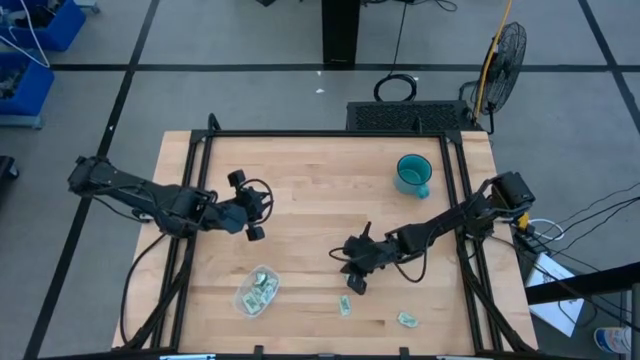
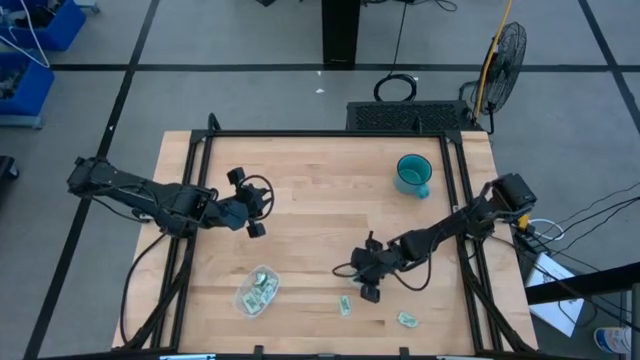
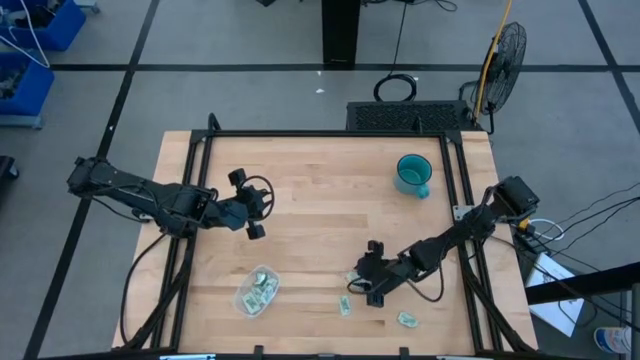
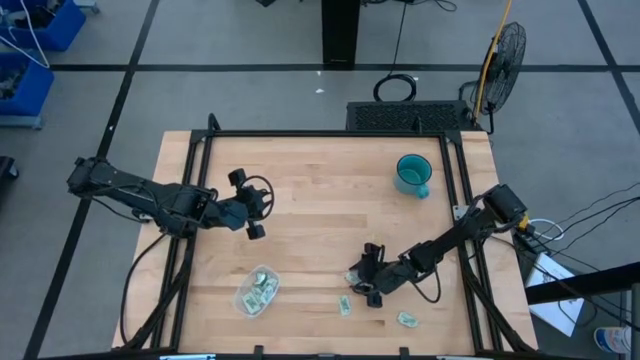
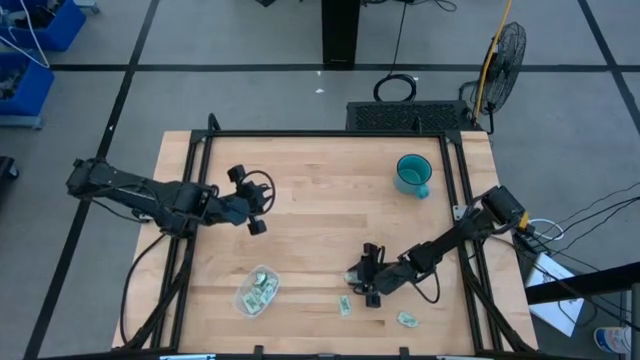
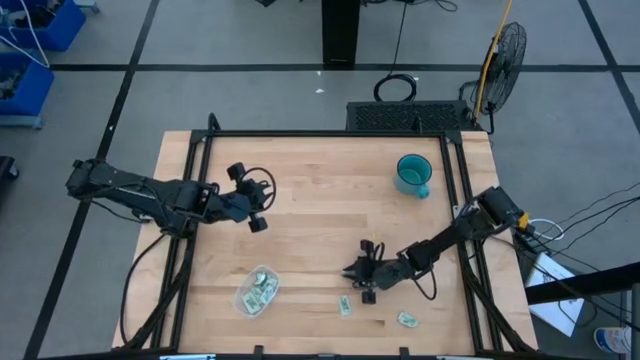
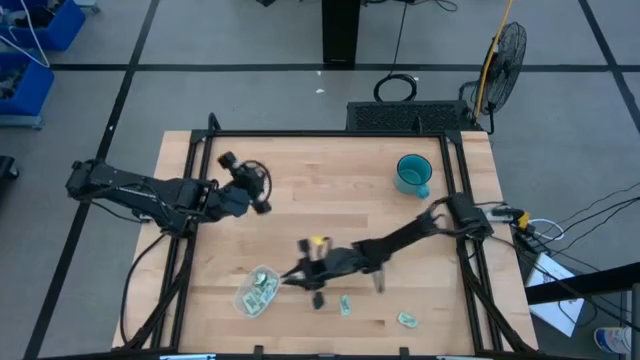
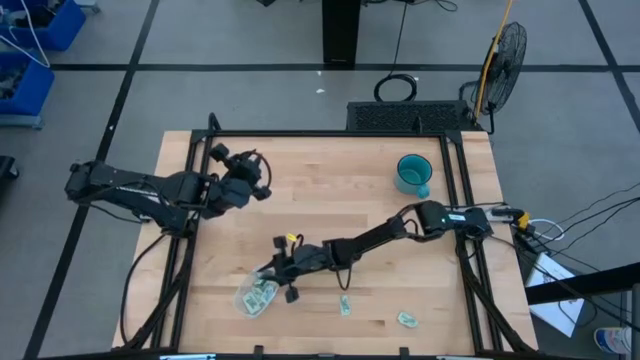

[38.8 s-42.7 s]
Task: Pick and place Stevia / Truvia into bins
Put the white stevia packet into the transparent bin

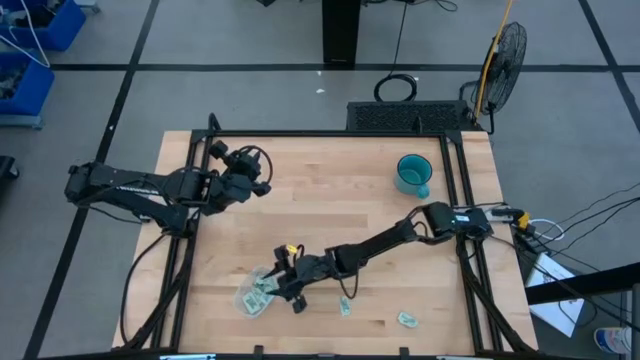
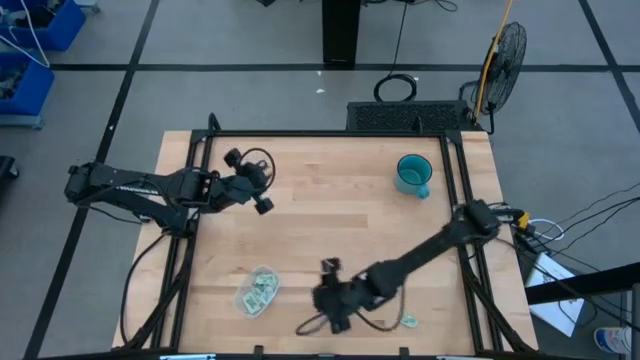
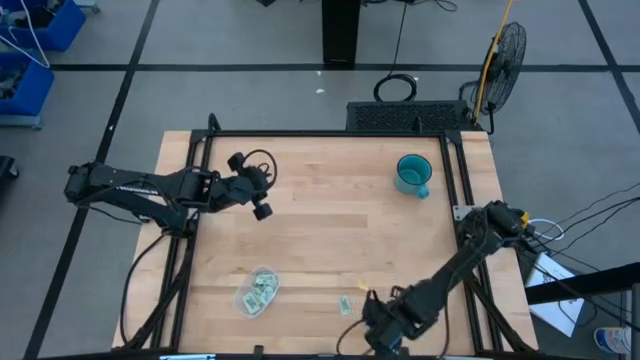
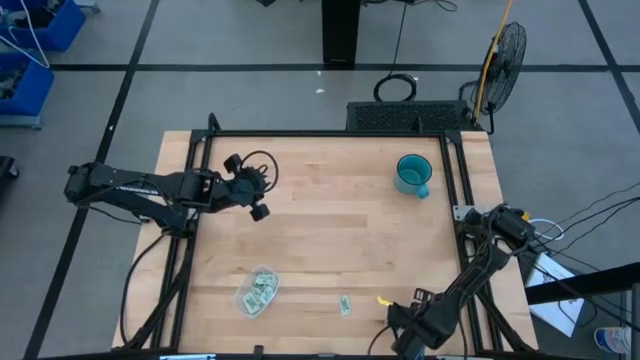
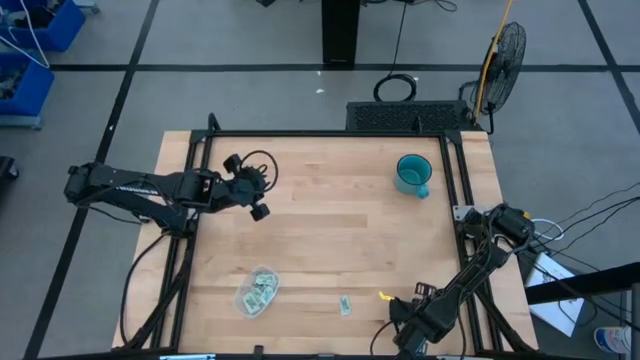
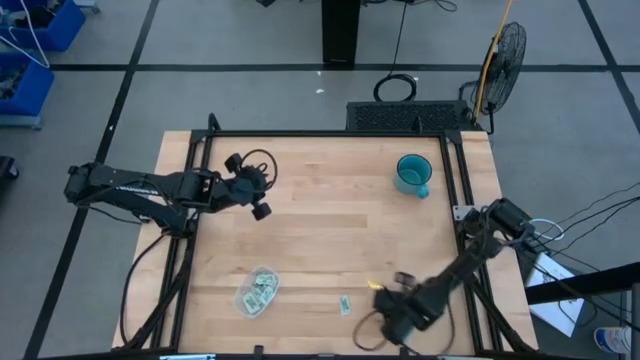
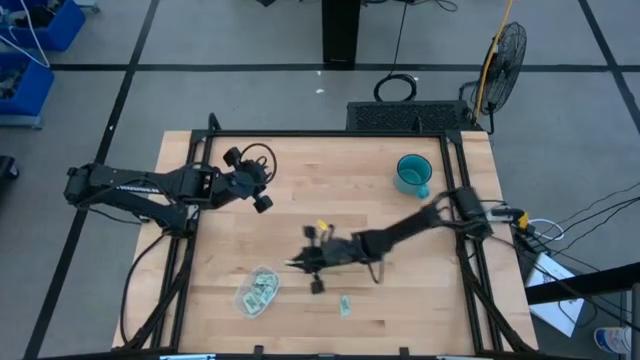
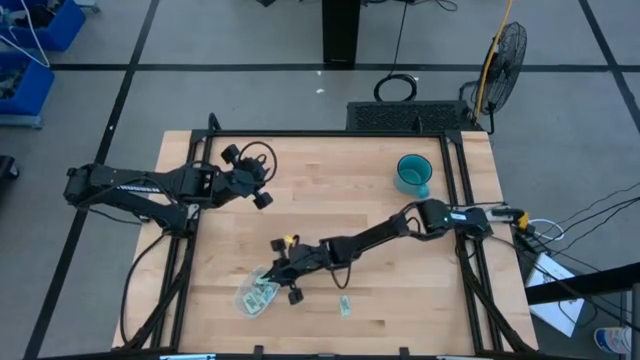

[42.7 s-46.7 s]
Put the white stevia packet into the transparent bin

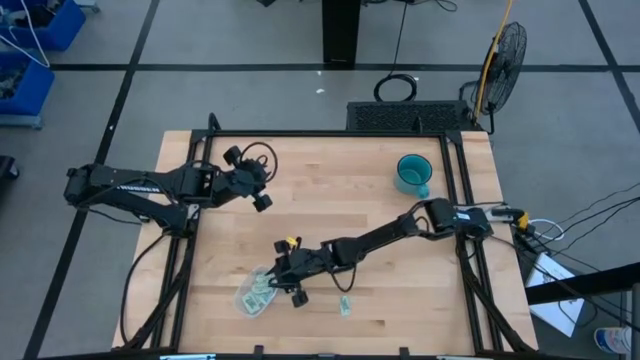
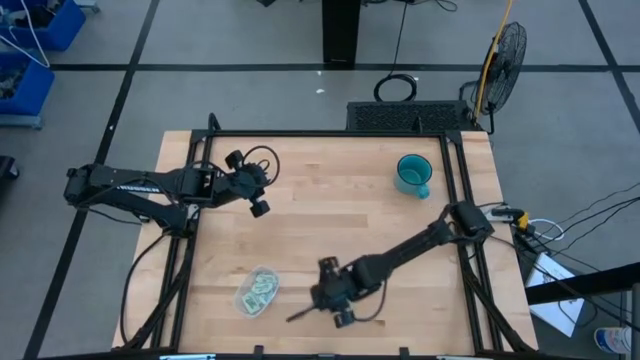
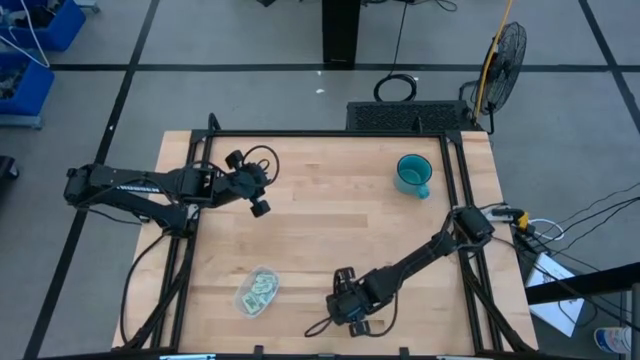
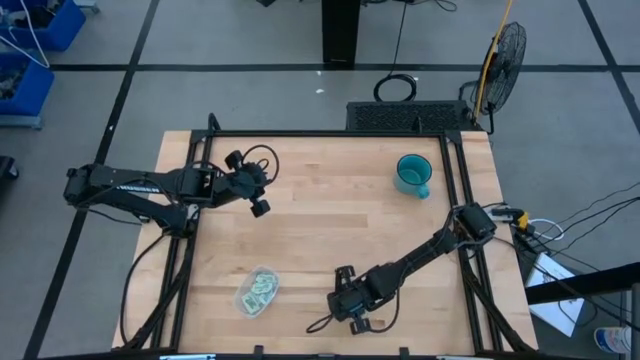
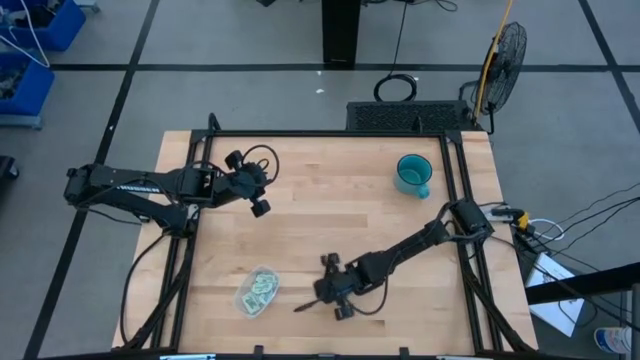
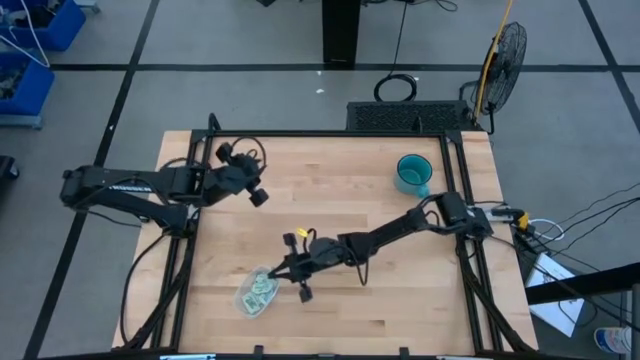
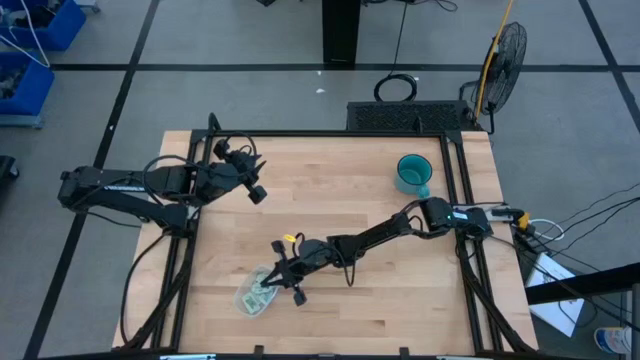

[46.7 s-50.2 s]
Put the white stevia packet into the transparent bin

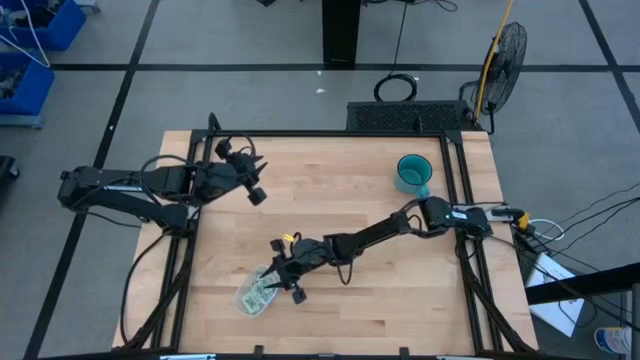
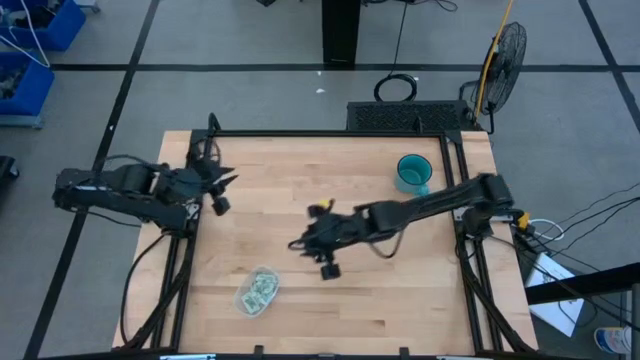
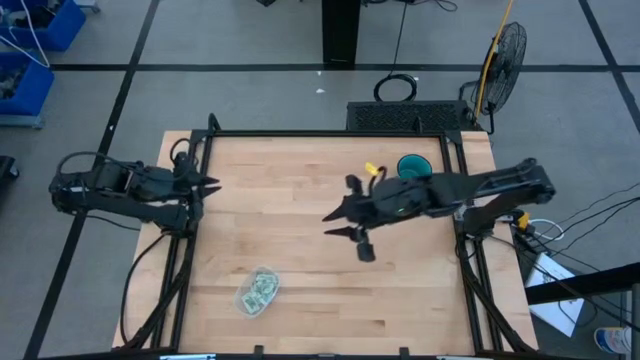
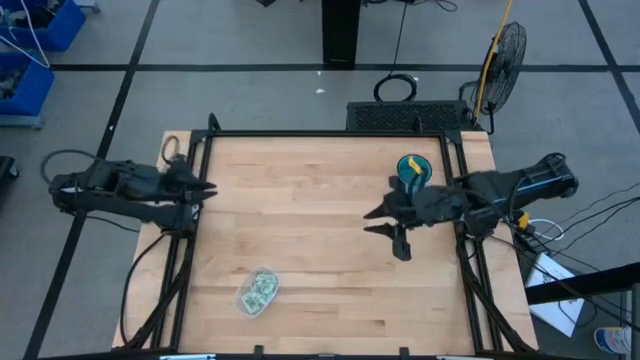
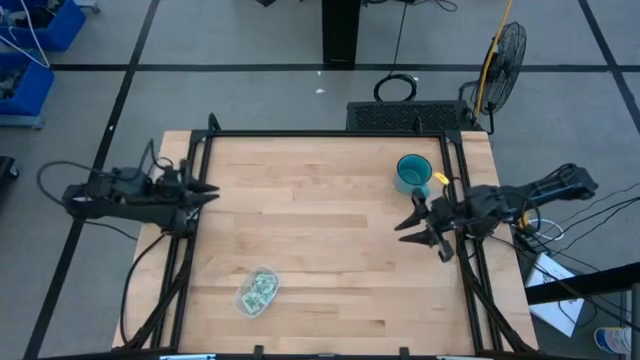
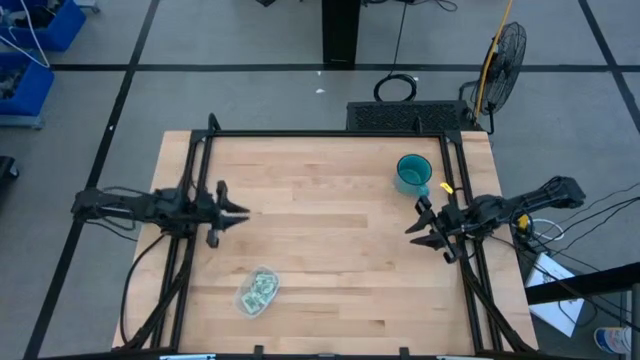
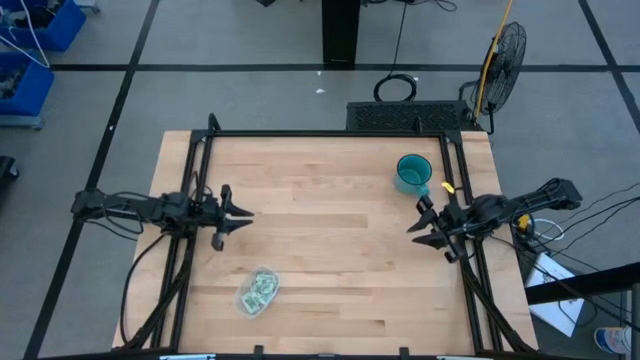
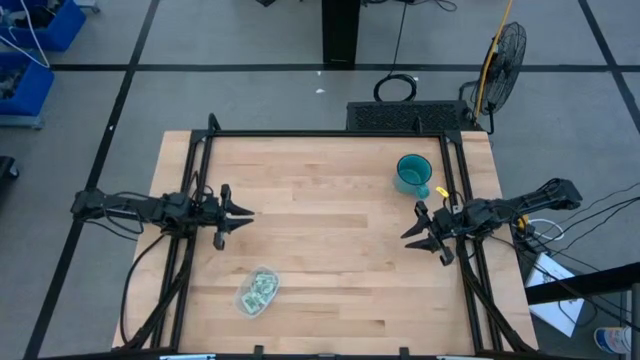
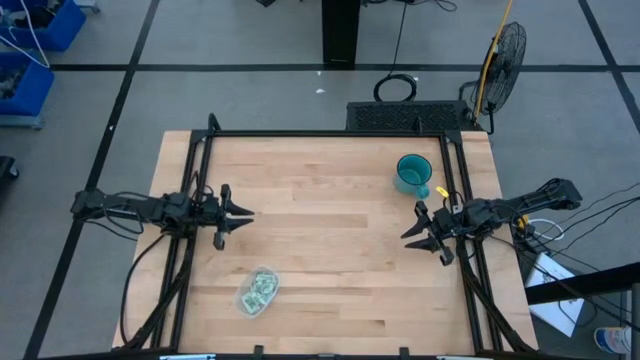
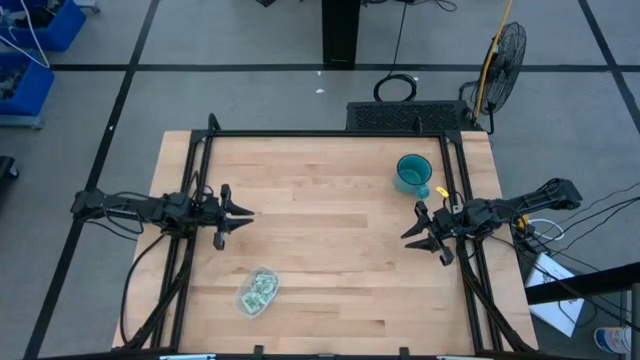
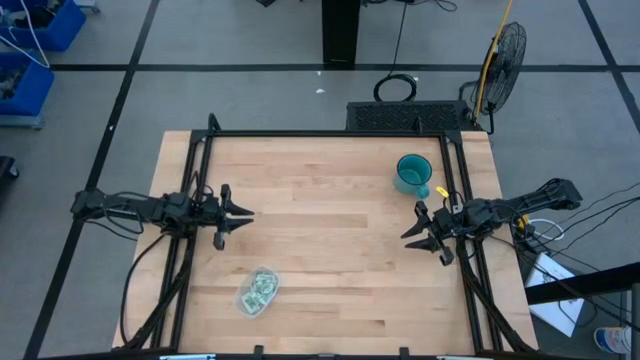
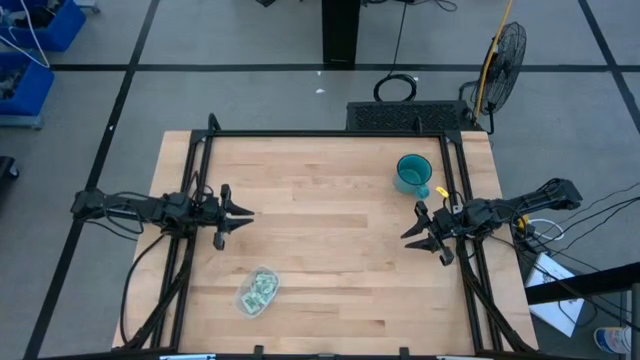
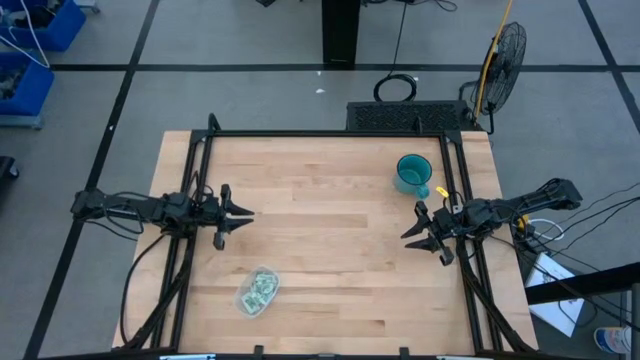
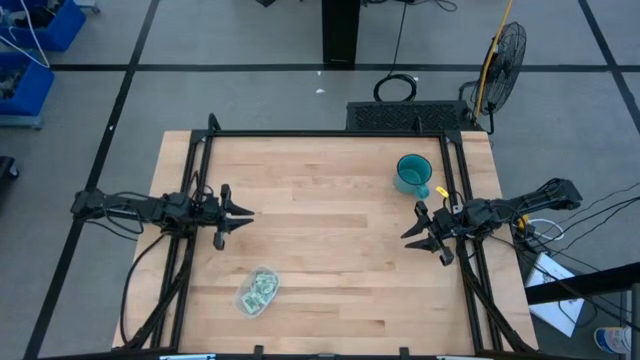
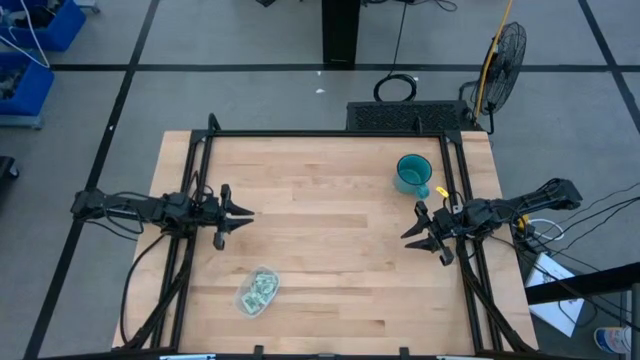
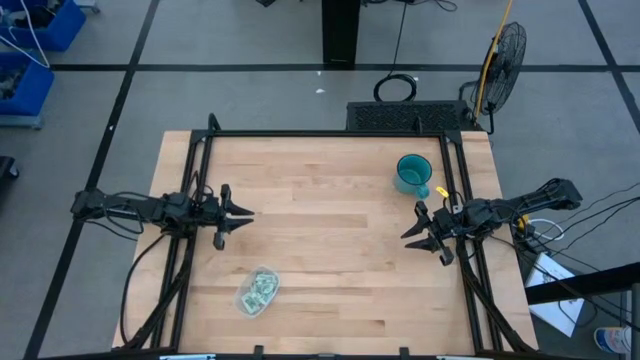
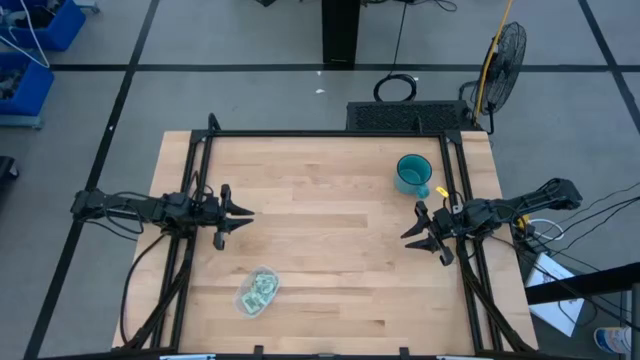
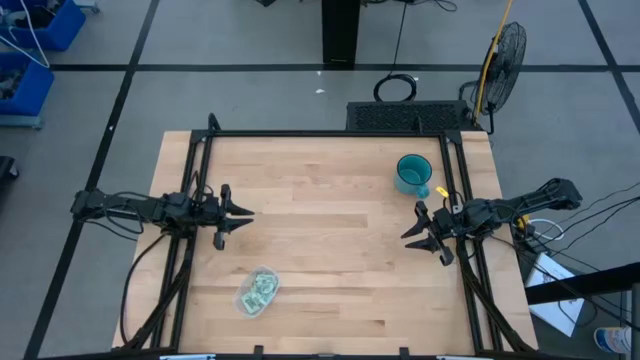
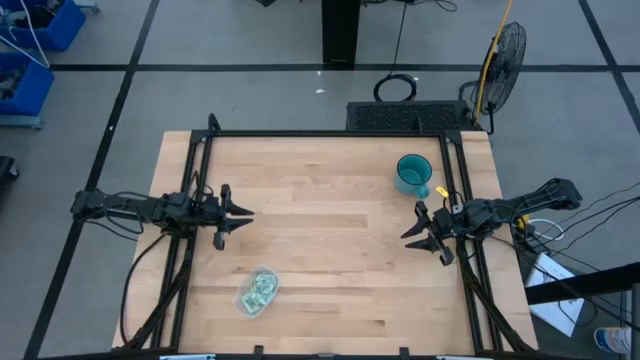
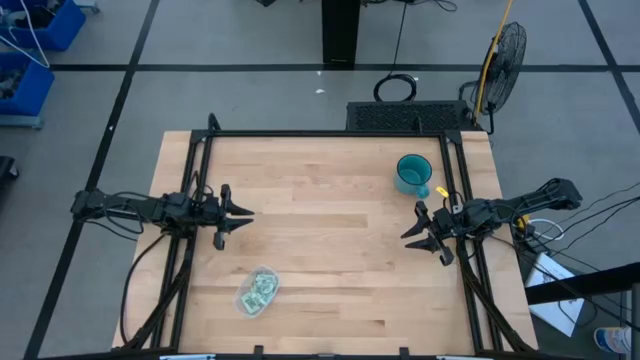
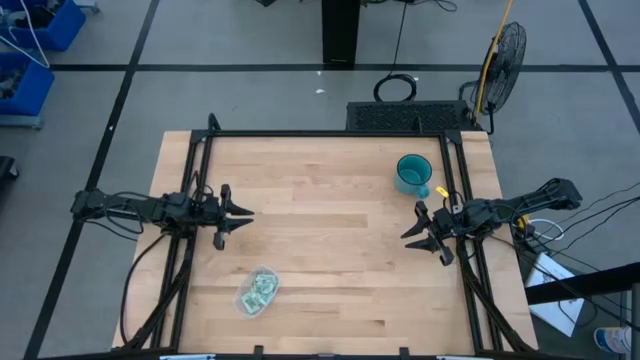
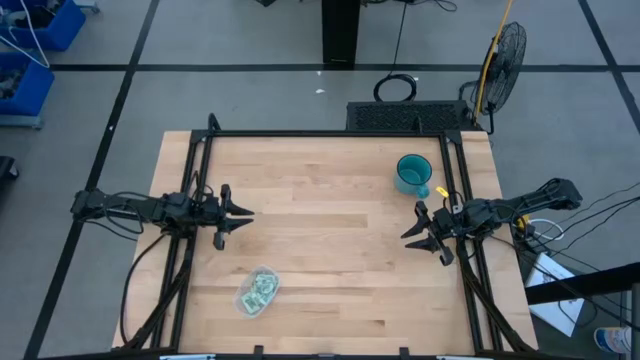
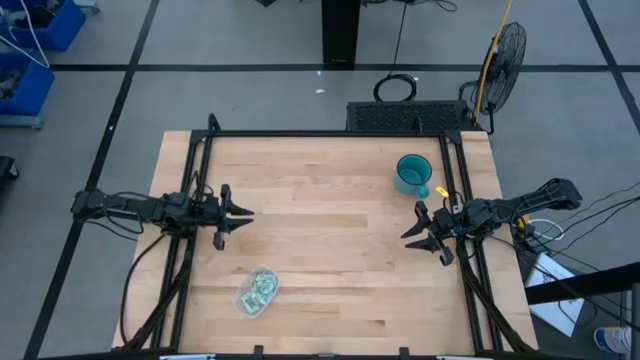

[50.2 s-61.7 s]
Return to Home Position
